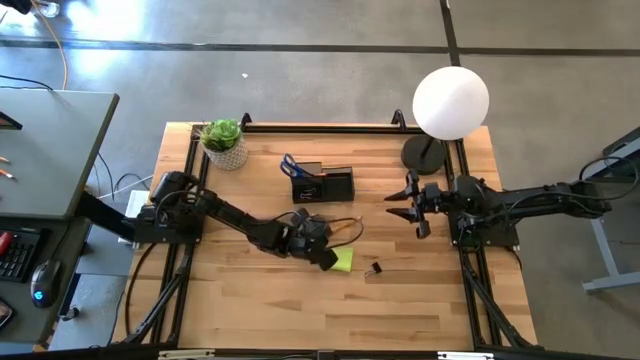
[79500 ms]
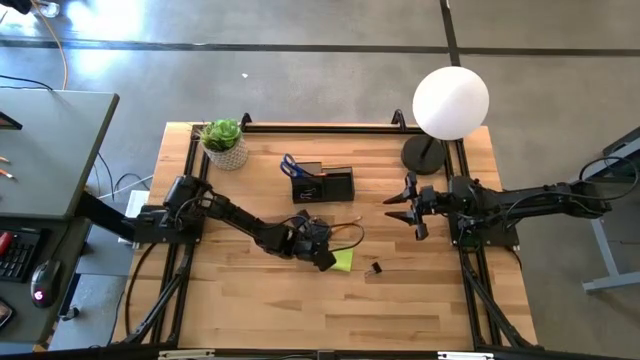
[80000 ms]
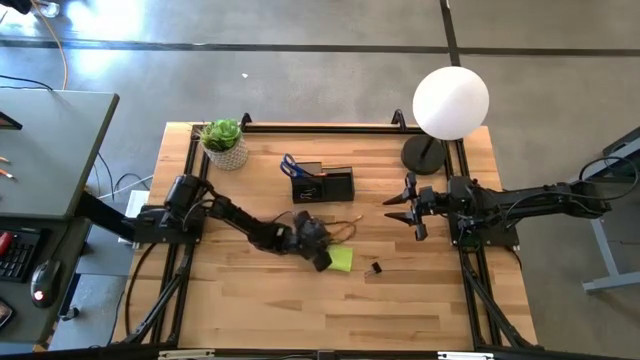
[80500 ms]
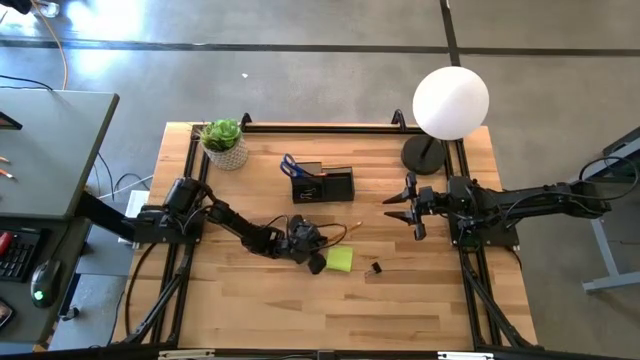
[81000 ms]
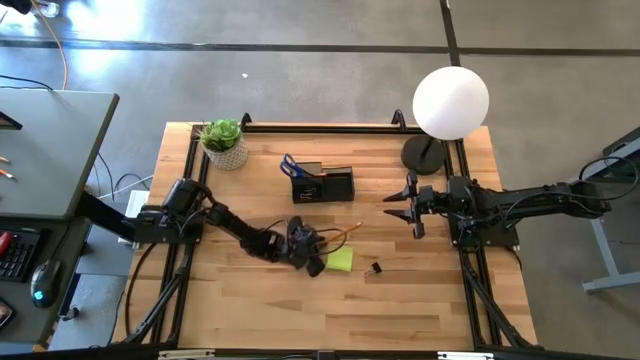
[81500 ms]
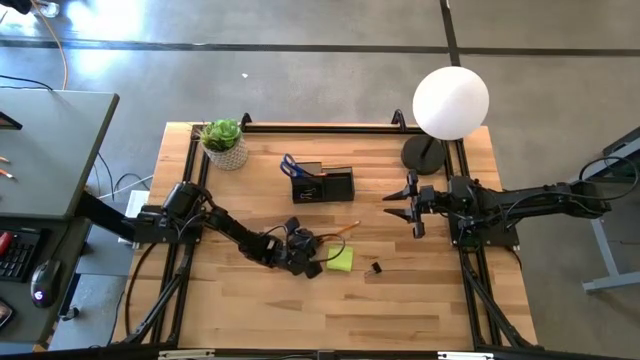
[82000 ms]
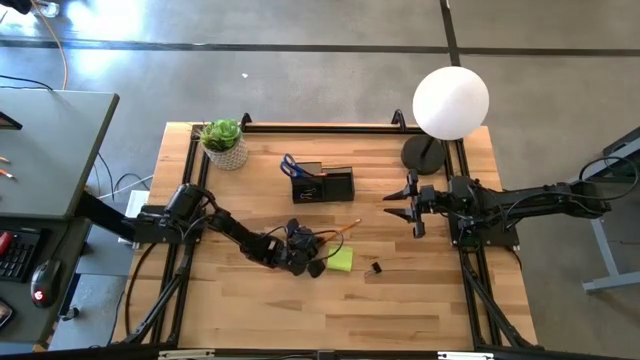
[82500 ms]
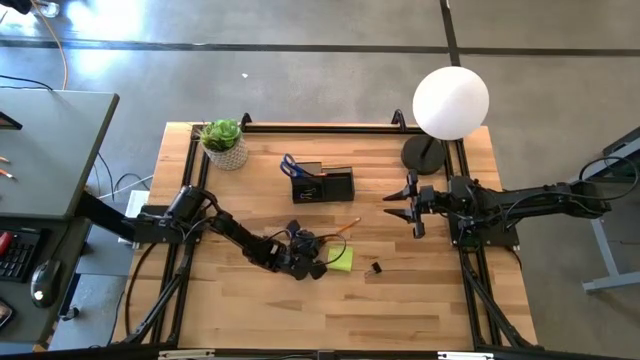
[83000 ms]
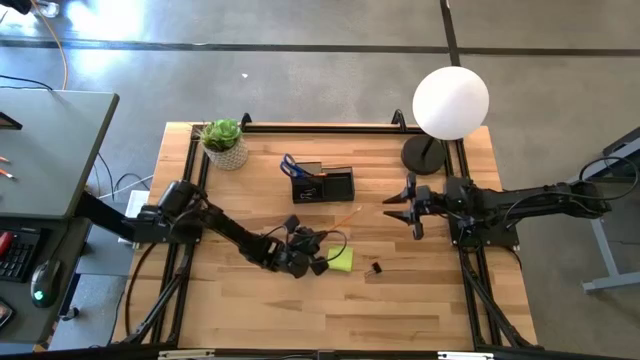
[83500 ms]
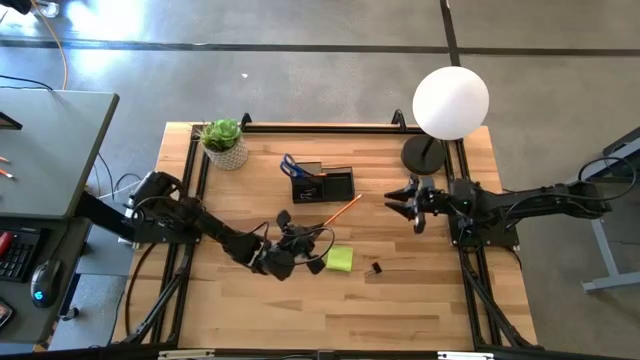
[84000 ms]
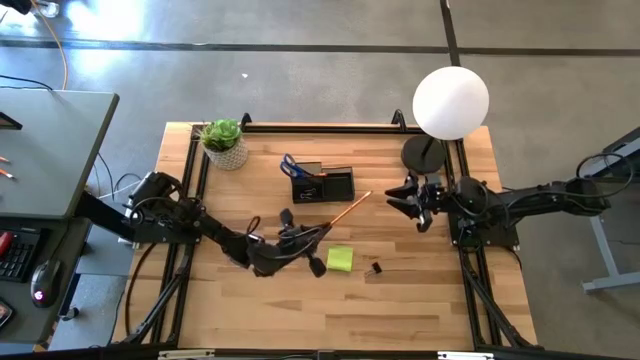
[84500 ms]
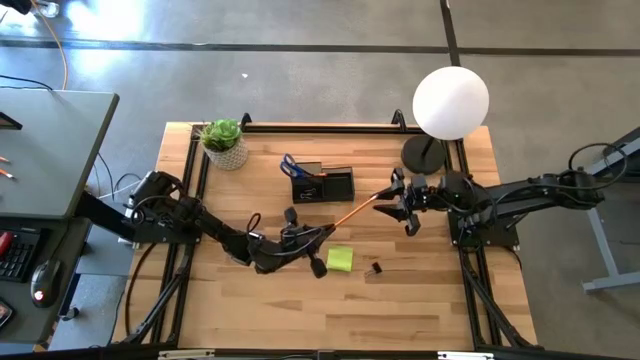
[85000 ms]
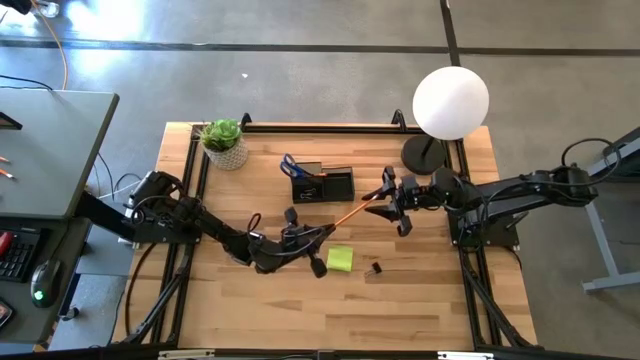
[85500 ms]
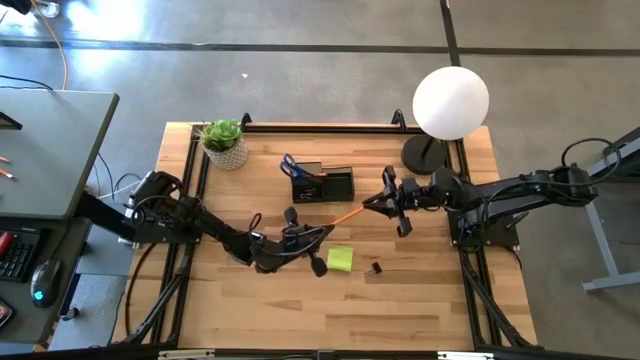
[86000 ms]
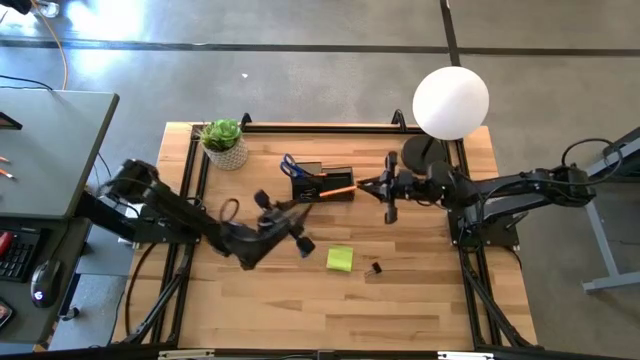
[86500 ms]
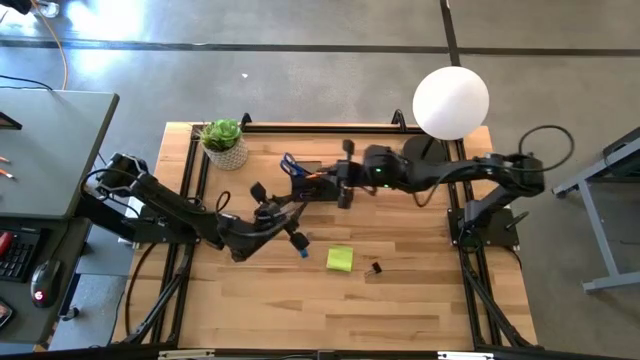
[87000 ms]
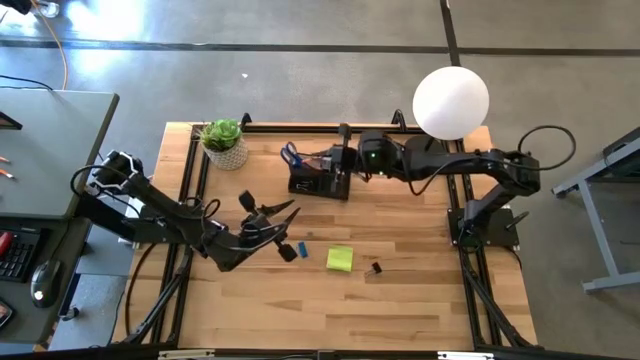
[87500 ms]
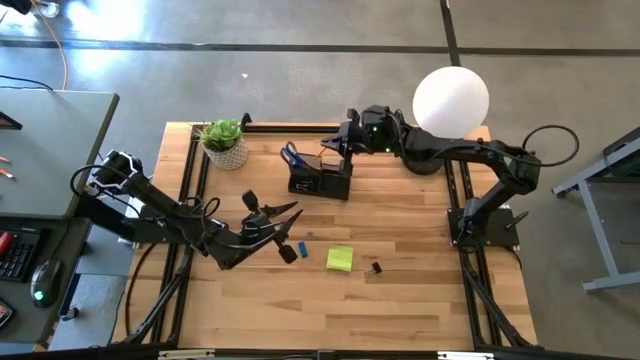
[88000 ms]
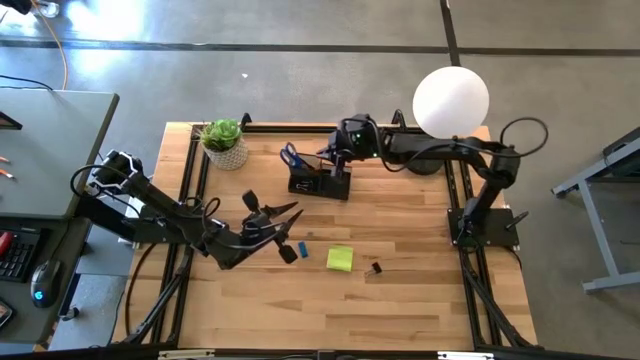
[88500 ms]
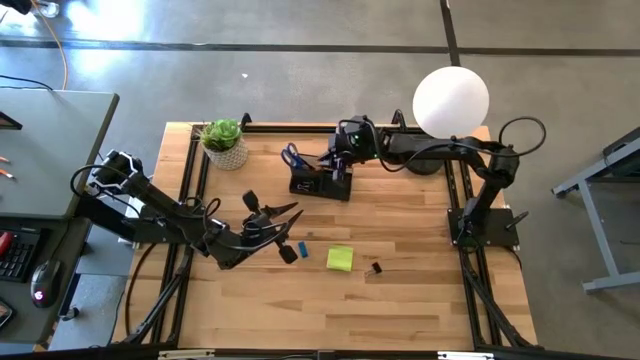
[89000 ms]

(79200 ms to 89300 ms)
Task: Pick and place office supplies into organizer
Put the orange pencil into the black desk organizer

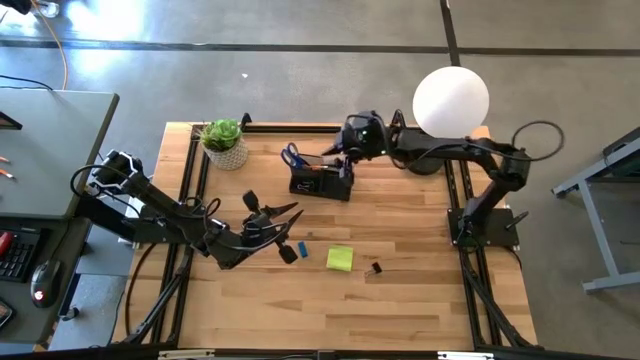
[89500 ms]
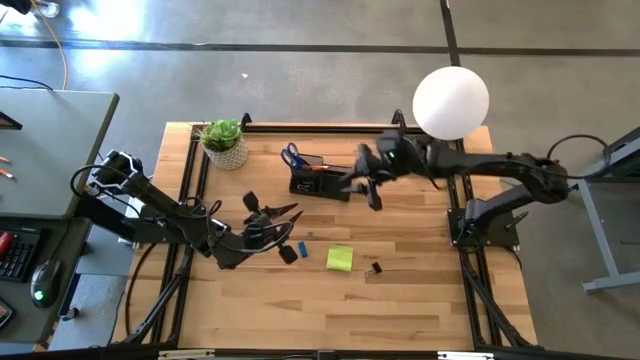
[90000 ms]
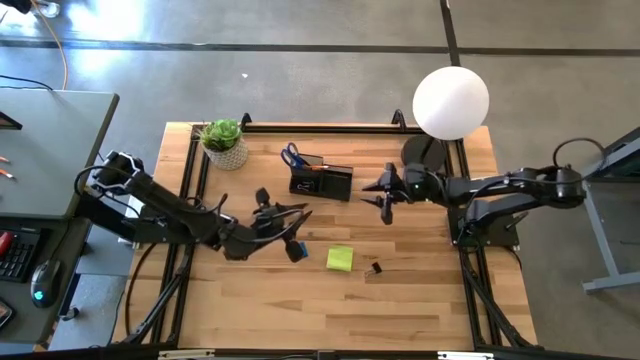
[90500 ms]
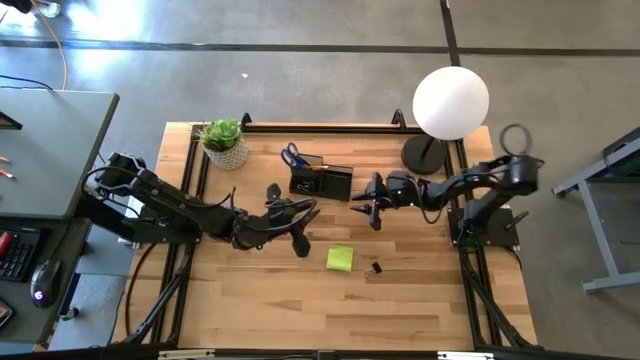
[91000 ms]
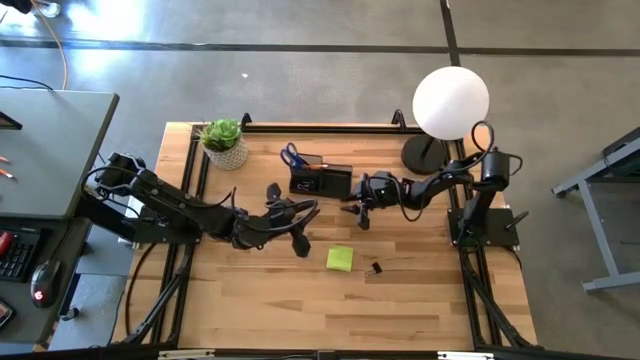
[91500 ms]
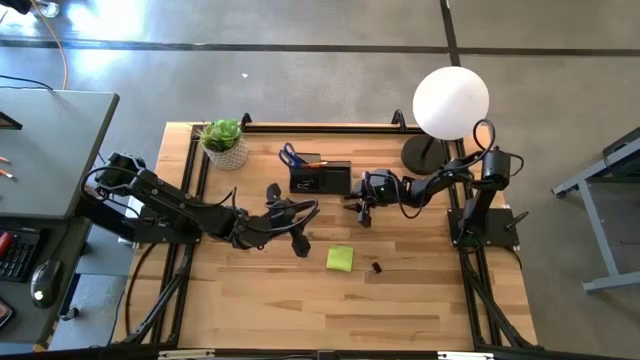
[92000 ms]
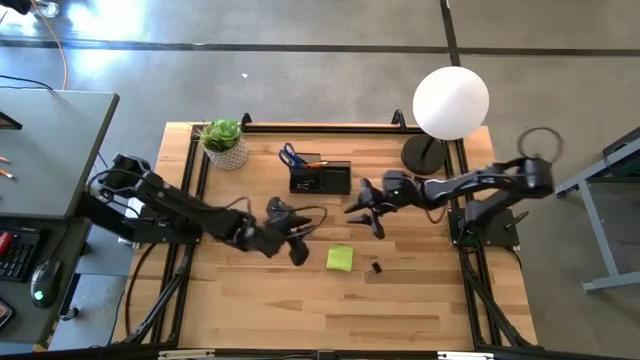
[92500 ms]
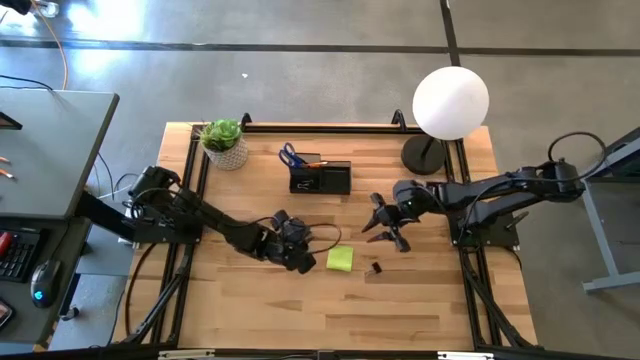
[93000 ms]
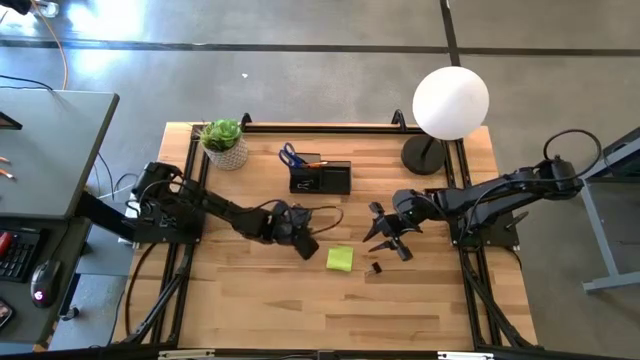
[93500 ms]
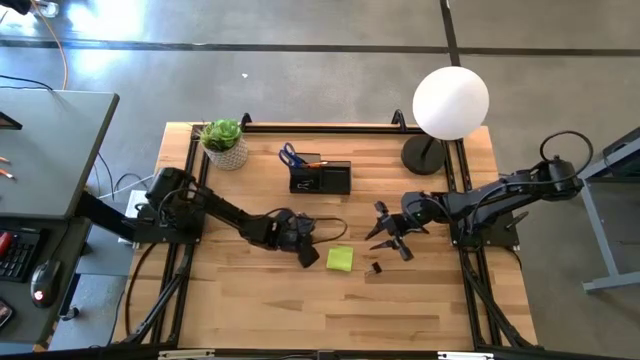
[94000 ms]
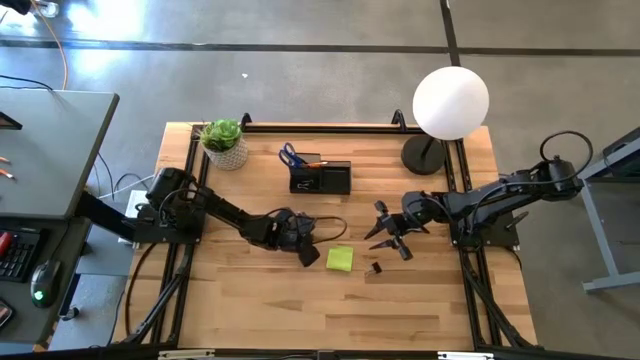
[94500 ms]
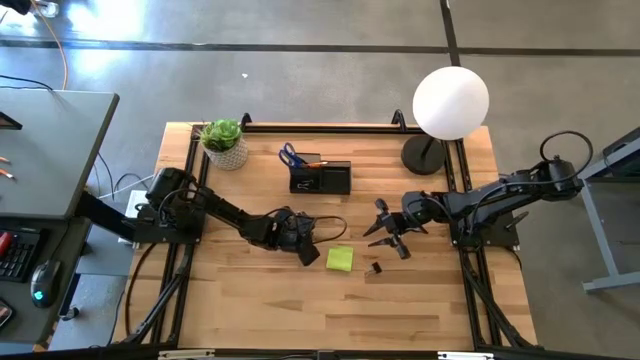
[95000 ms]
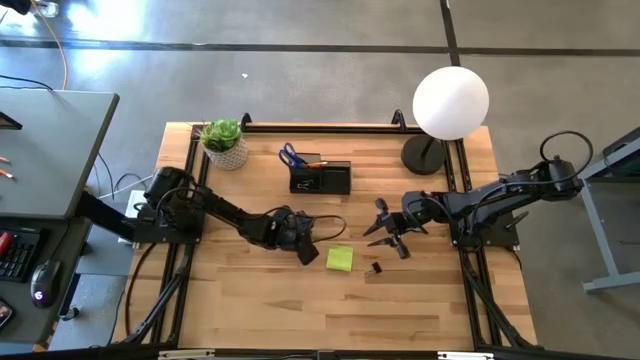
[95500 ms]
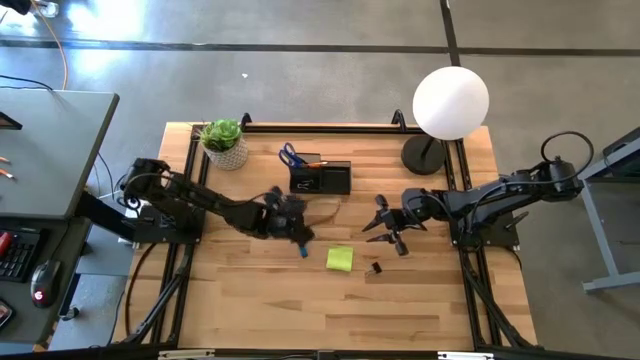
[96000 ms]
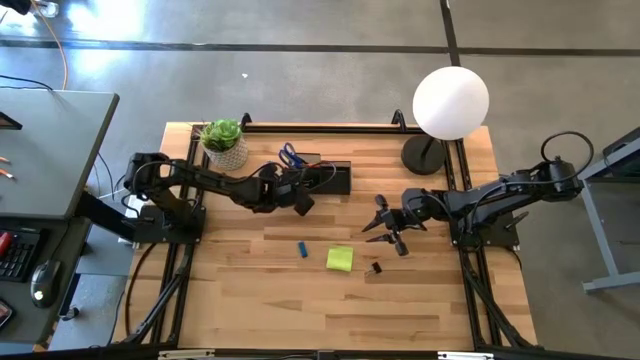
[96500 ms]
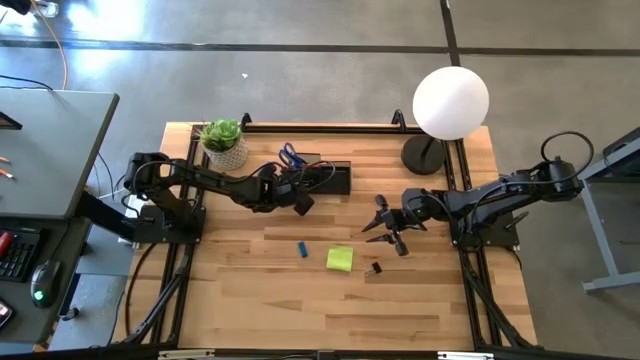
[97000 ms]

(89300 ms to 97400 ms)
Put the blue binder clip into the black desk organizer

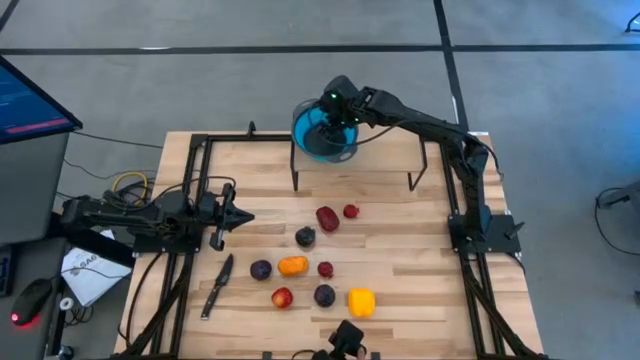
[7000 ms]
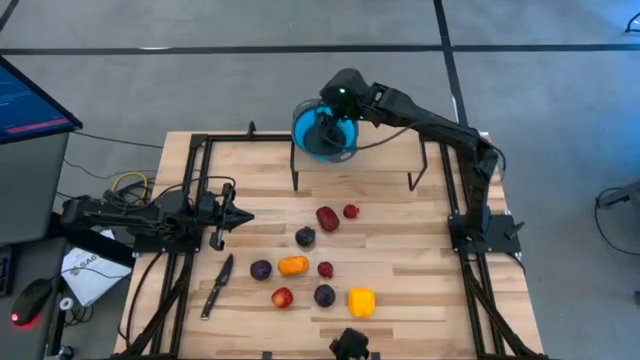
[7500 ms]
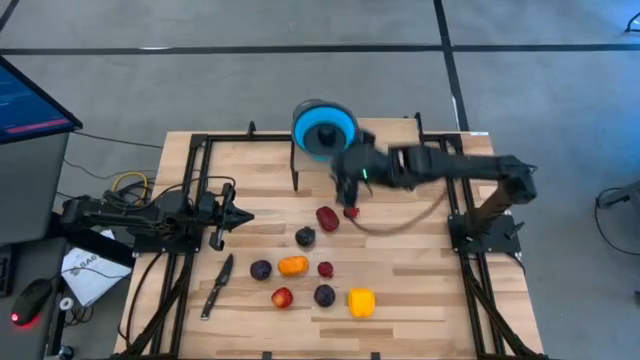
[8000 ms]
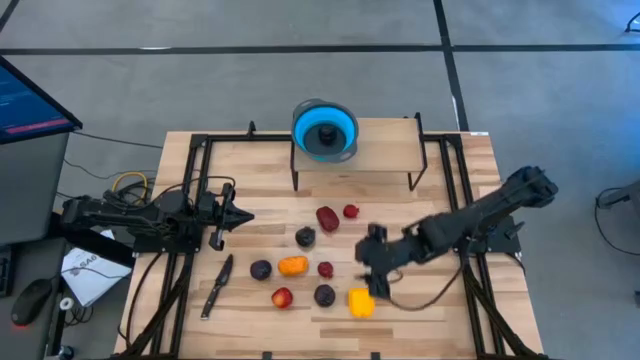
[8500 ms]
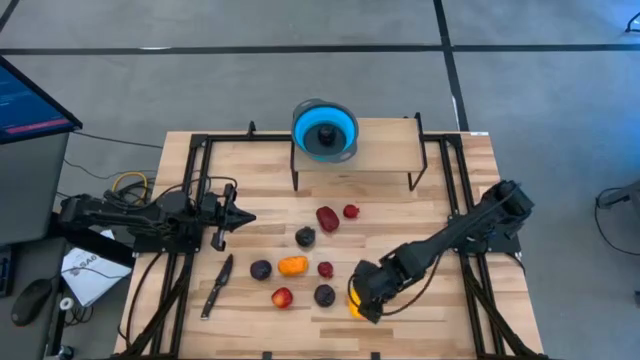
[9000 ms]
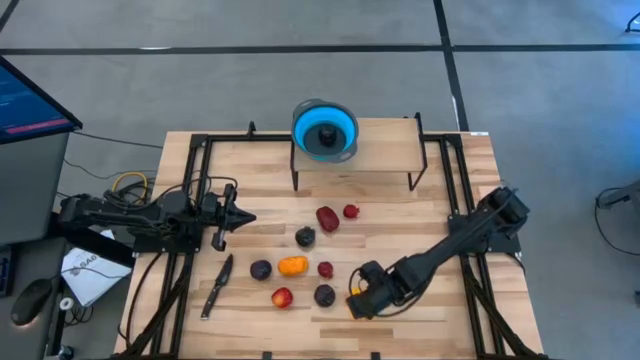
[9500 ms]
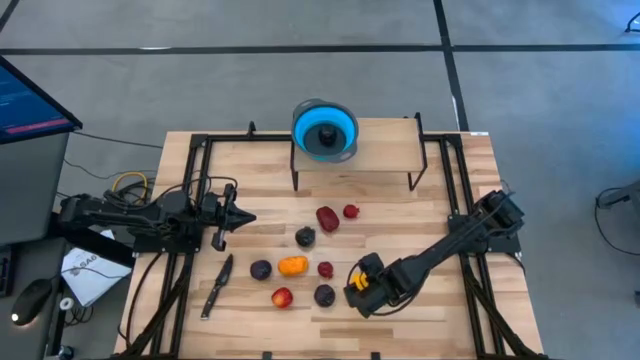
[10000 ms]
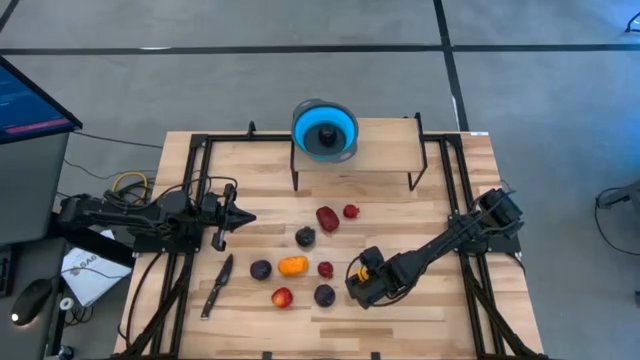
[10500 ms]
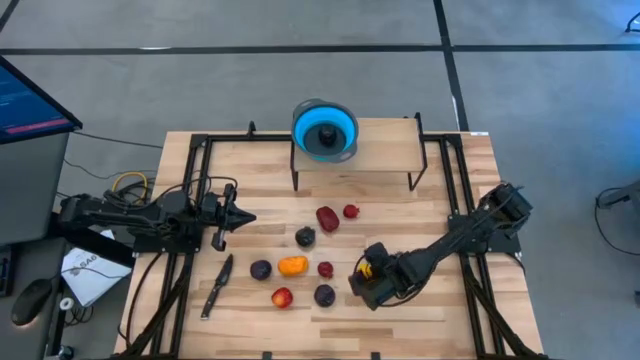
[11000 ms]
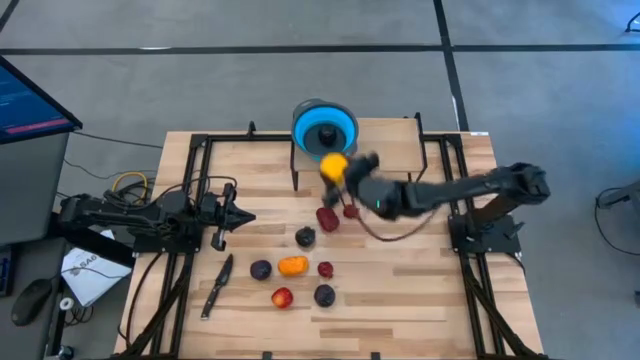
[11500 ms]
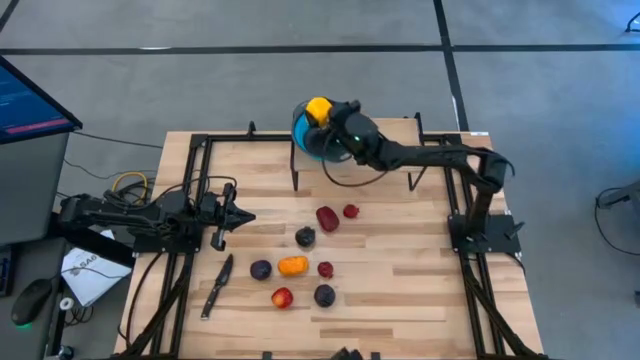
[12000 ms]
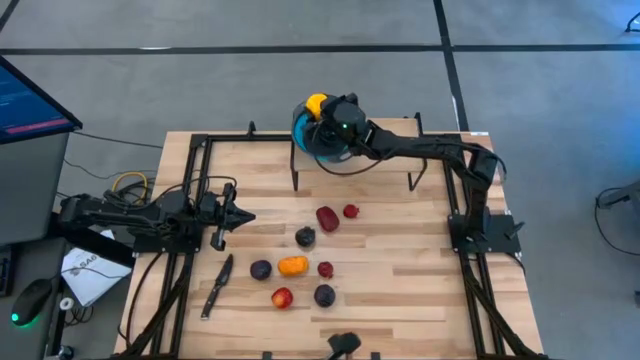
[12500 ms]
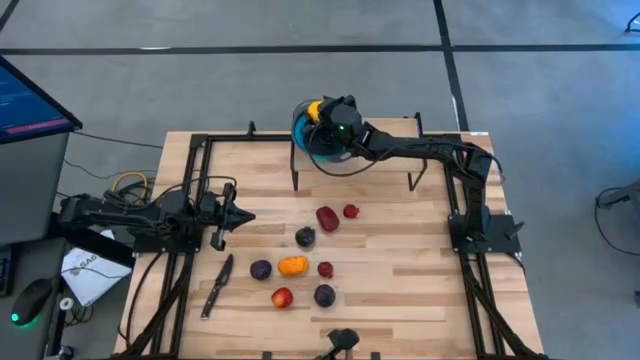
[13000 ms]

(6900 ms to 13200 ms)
Task: Pick & Place Fruit
Put the yellow bell pepper into the blue strainer bowl on the shelf
